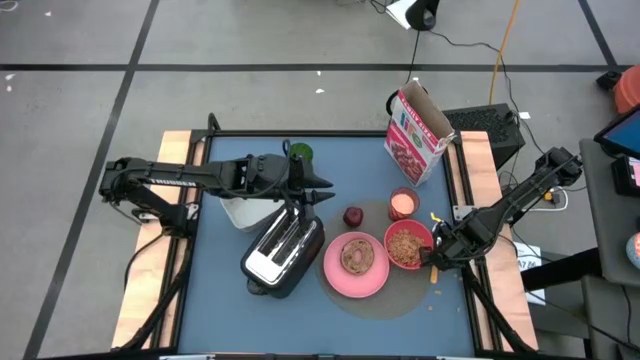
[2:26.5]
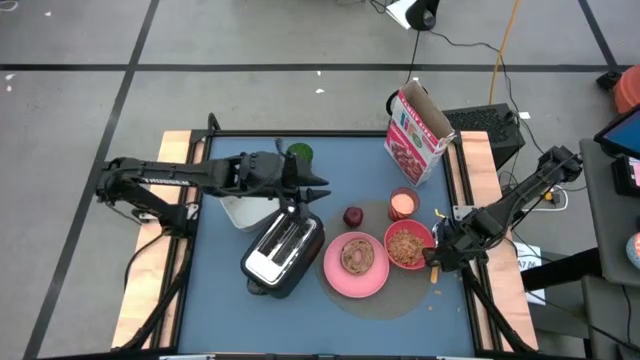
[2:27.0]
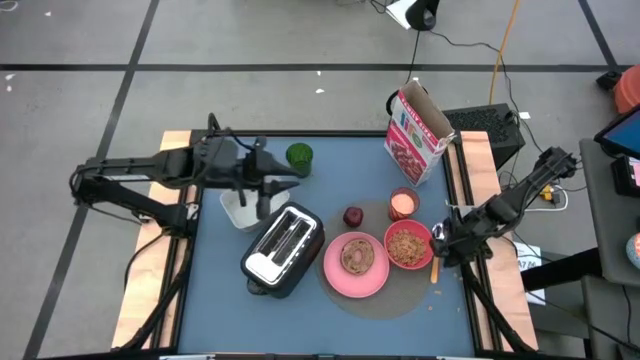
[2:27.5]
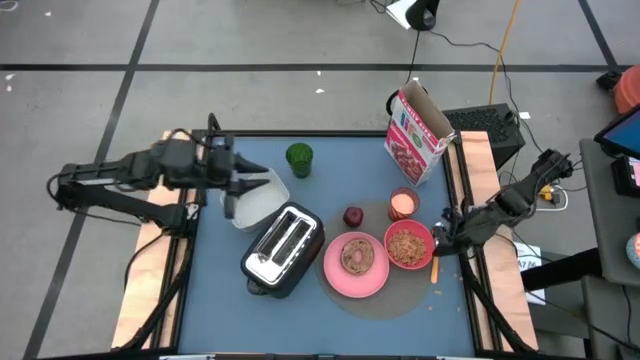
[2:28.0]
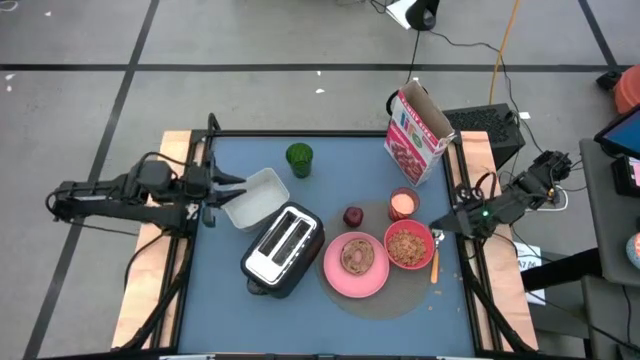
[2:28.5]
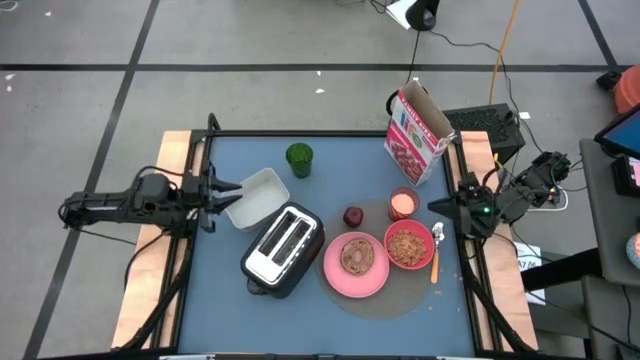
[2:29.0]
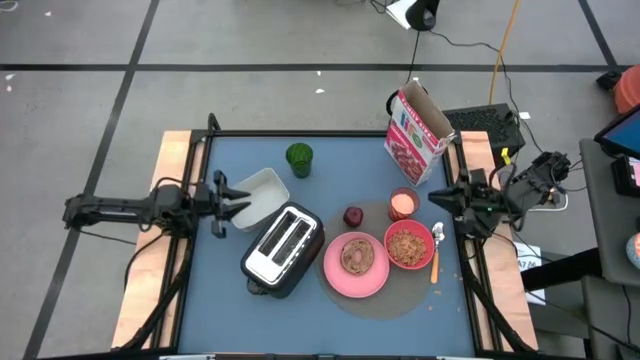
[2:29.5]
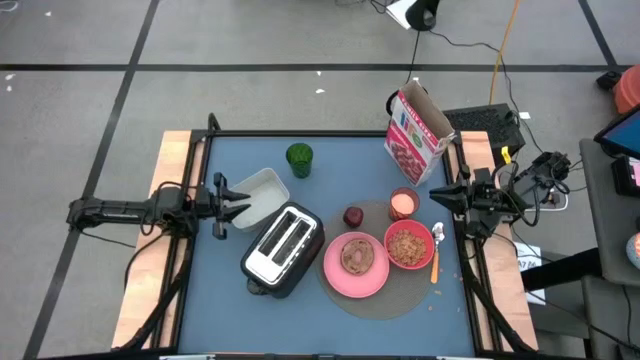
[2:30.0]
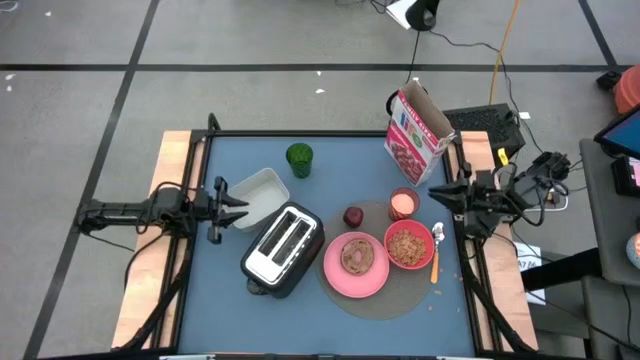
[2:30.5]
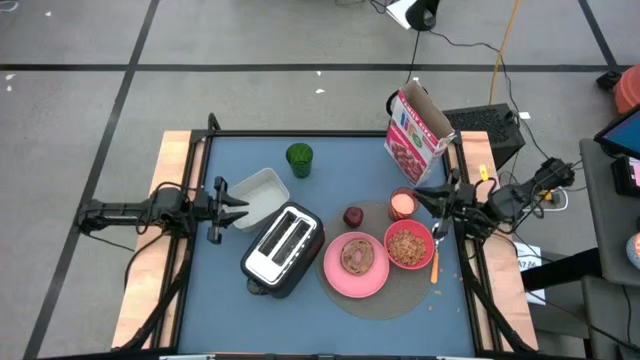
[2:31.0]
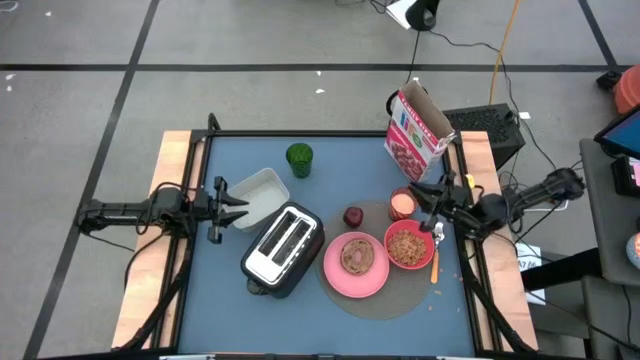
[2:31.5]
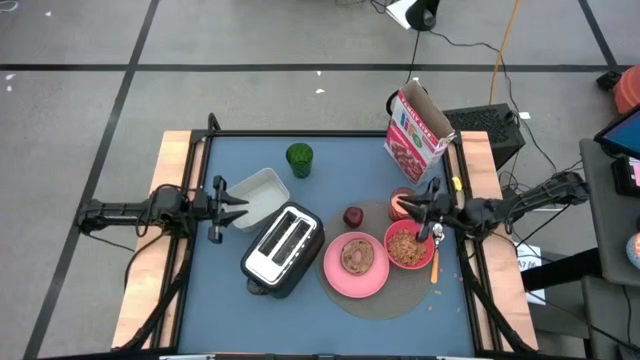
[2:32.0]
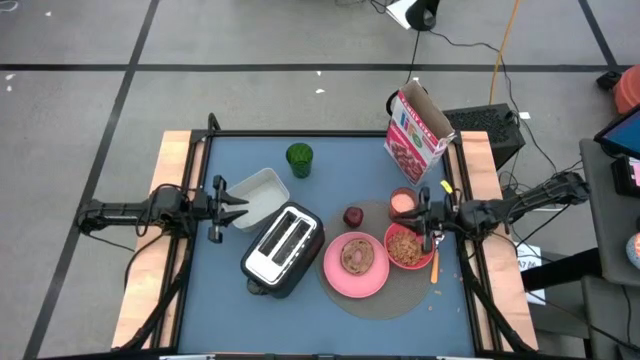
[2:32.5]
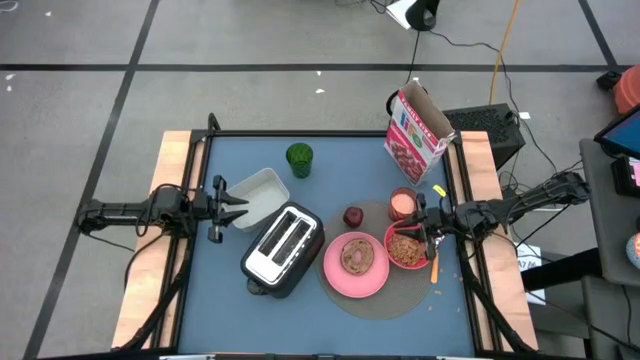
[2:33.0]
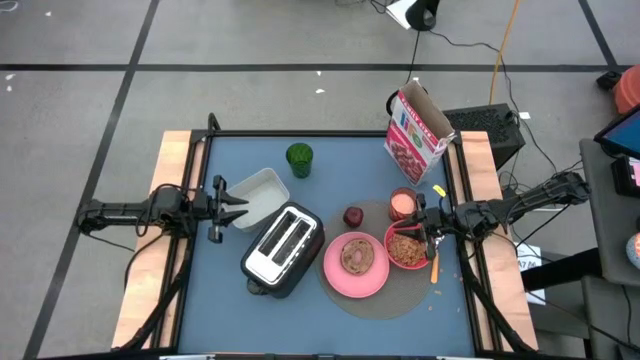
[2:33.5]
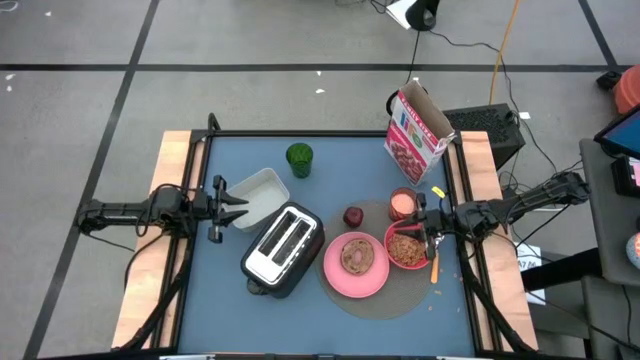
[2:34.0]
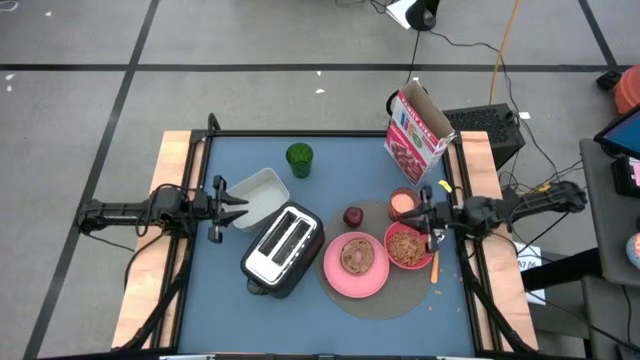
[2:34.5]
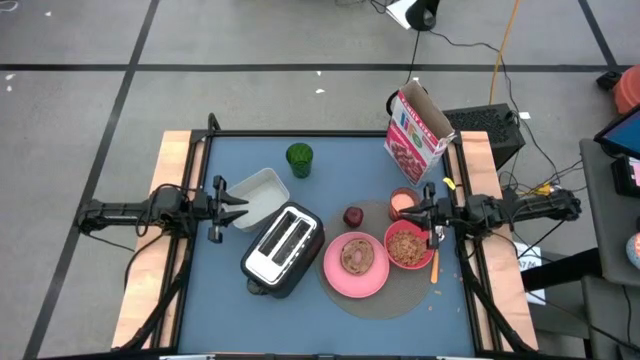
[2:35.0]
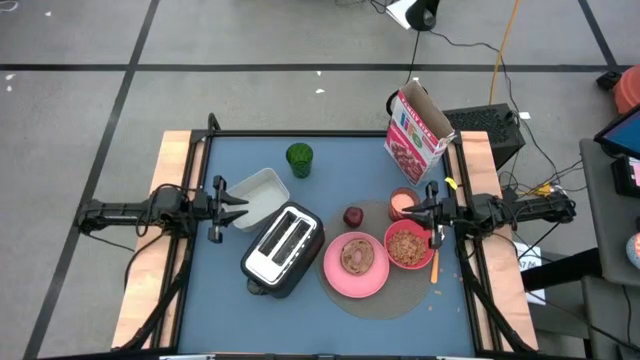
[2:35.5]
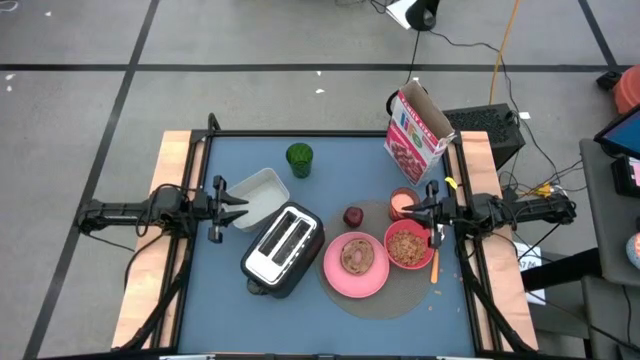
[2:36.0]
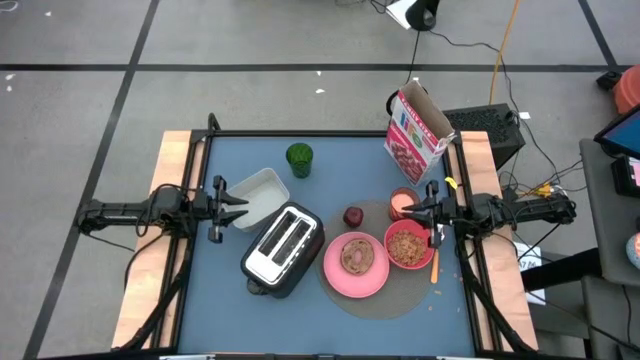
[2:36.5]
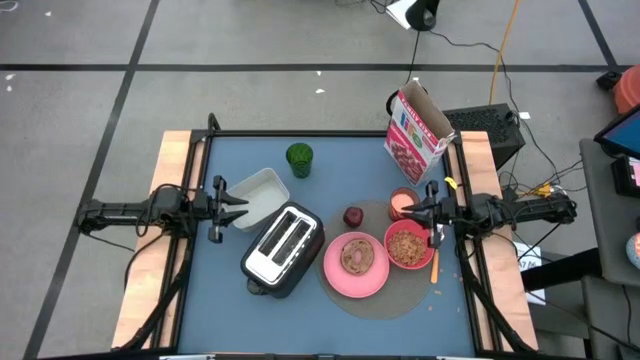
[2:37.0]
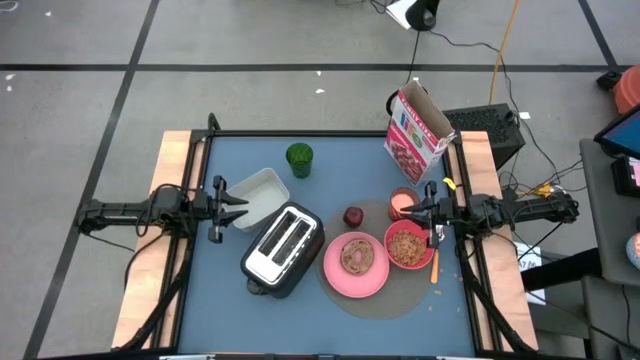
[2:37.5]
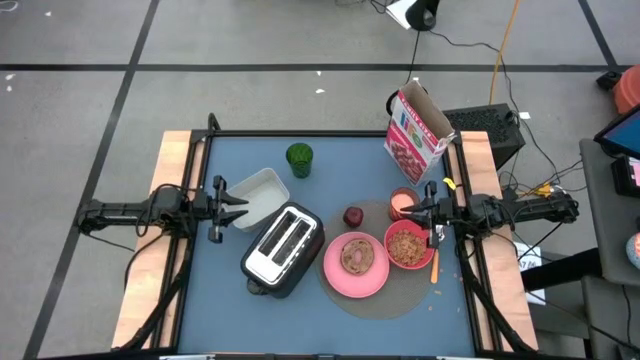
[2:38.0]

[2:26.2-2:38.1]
Task: Arrange a breakfast setting
Return to Home Position

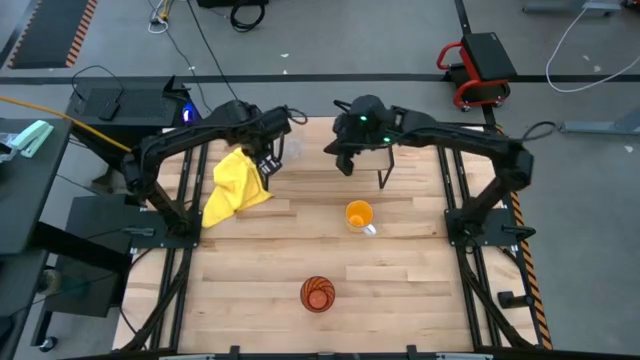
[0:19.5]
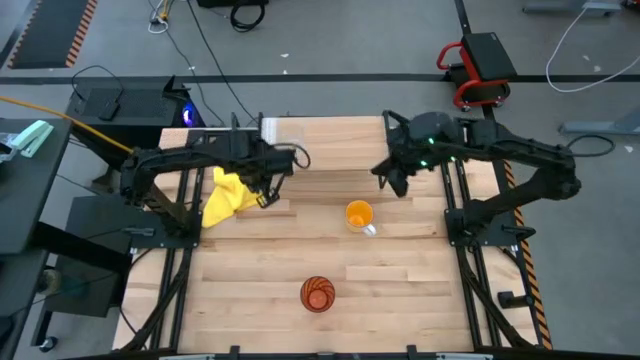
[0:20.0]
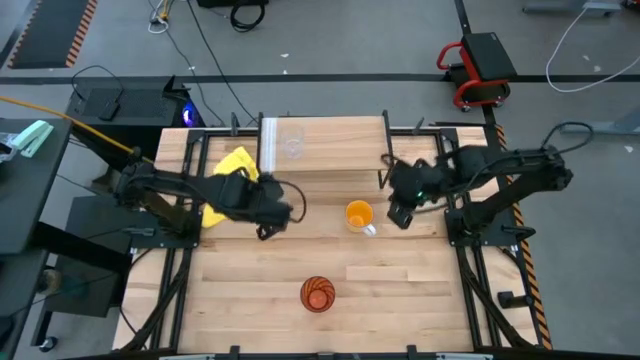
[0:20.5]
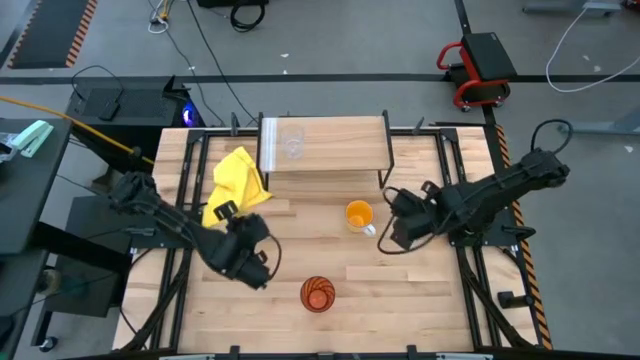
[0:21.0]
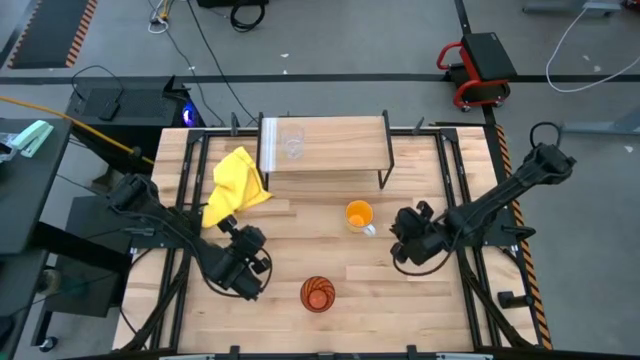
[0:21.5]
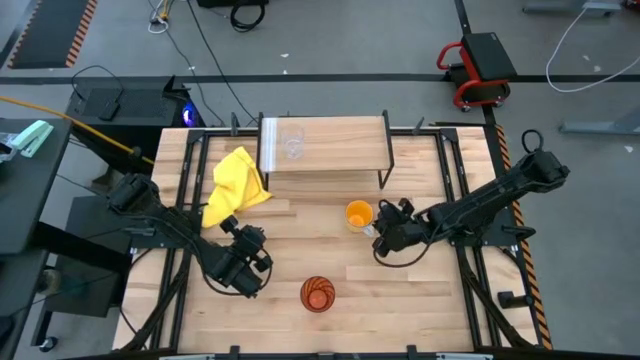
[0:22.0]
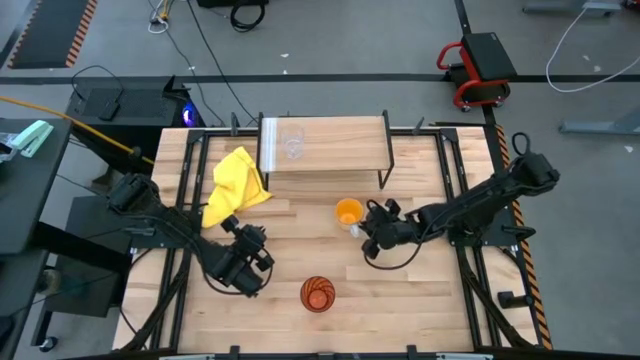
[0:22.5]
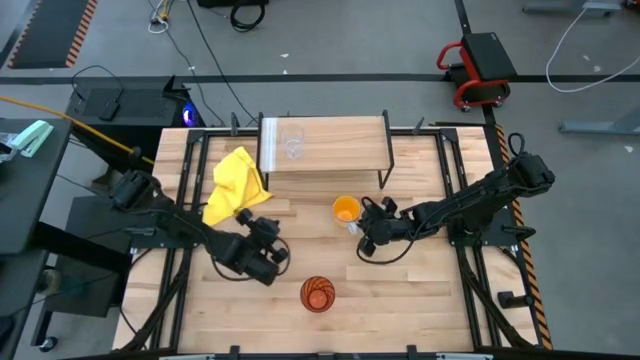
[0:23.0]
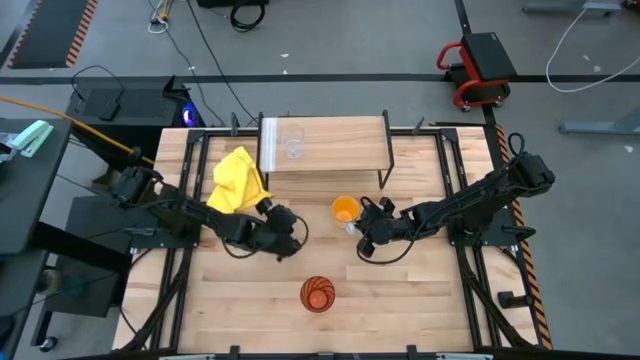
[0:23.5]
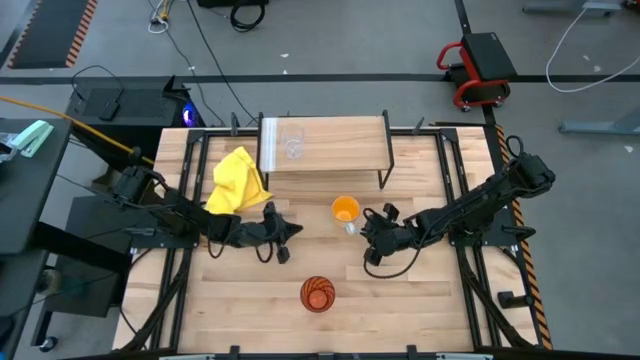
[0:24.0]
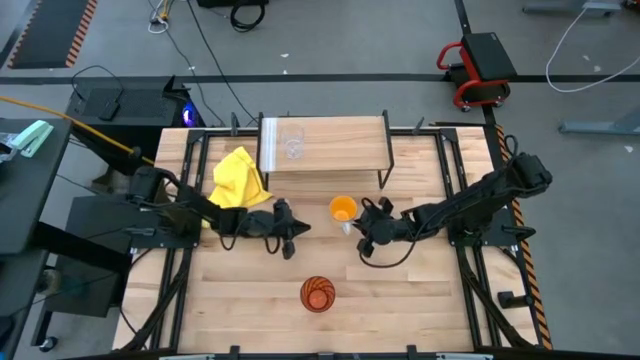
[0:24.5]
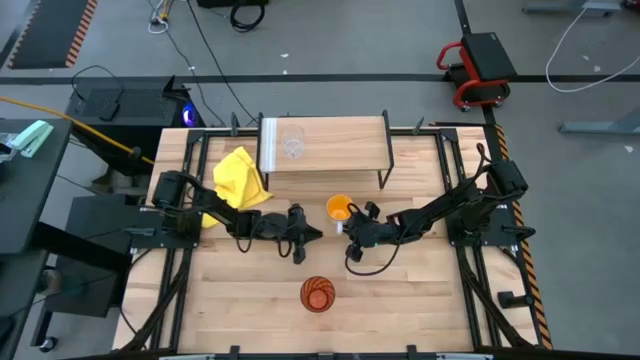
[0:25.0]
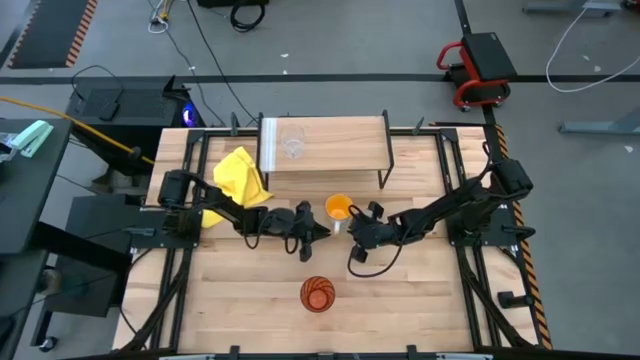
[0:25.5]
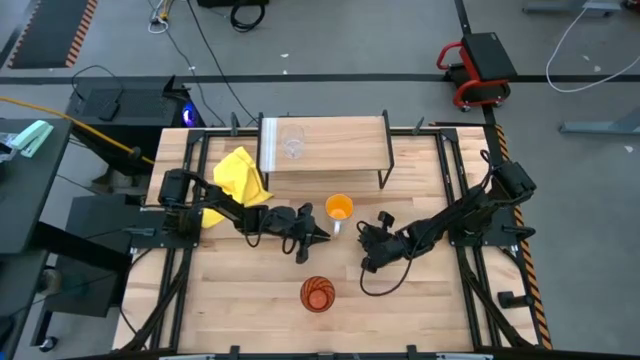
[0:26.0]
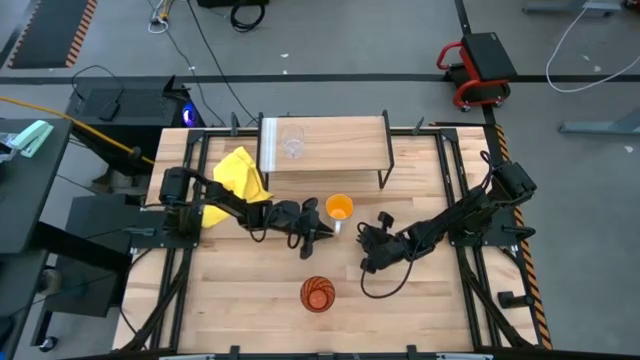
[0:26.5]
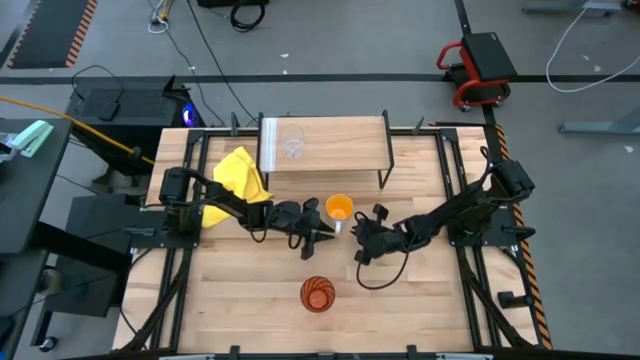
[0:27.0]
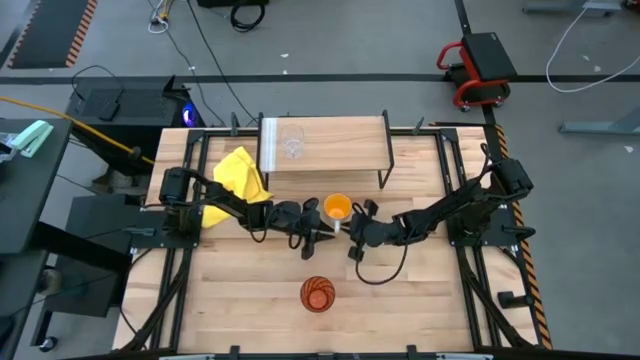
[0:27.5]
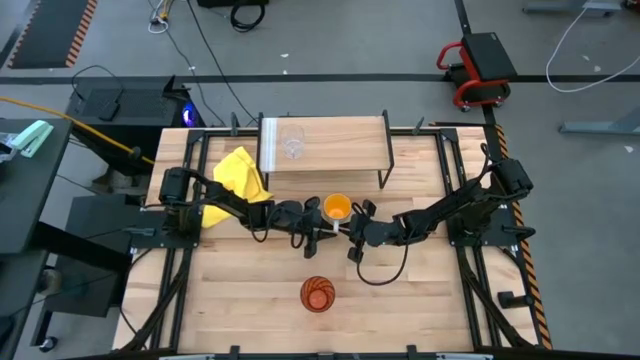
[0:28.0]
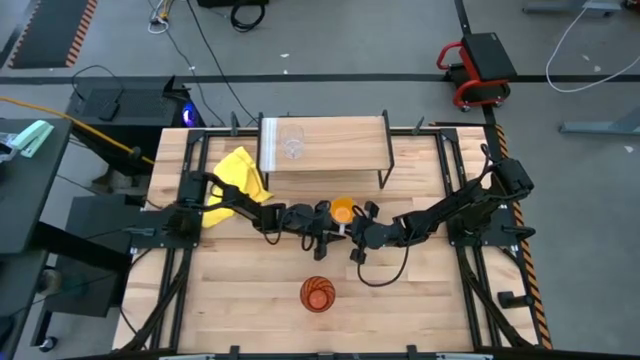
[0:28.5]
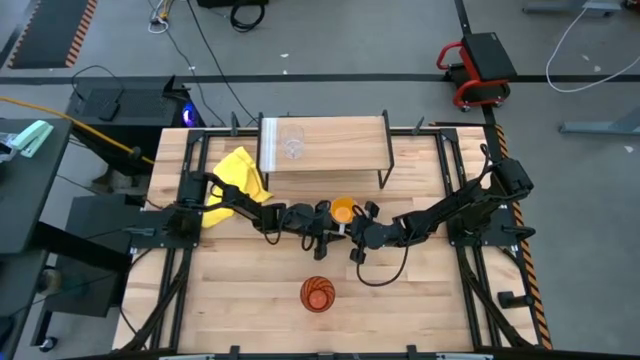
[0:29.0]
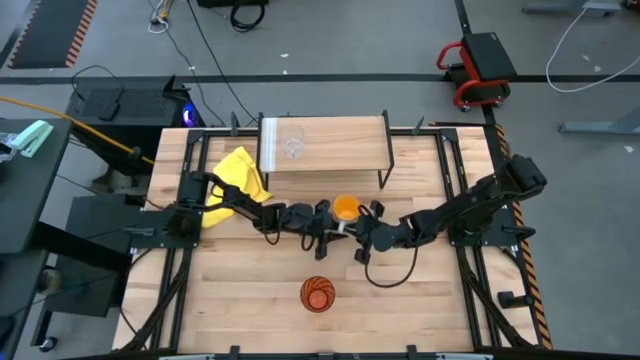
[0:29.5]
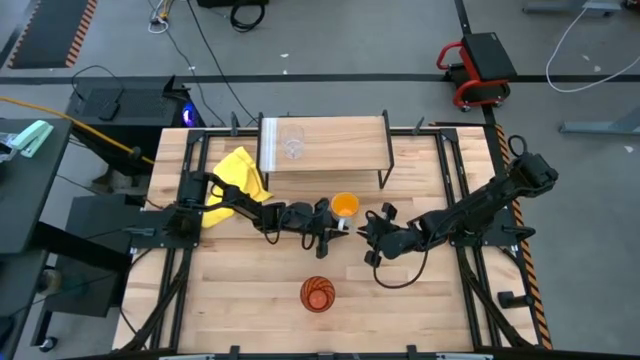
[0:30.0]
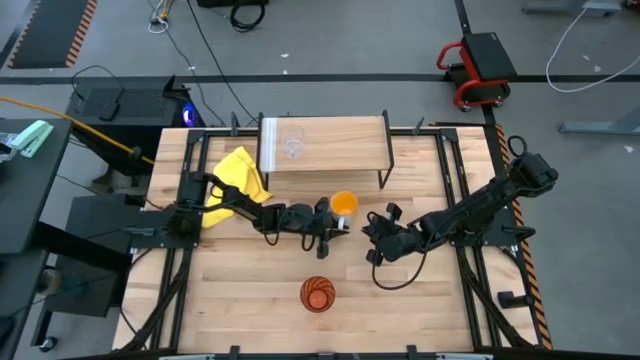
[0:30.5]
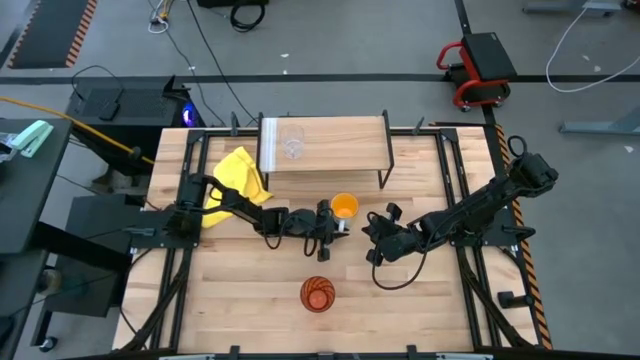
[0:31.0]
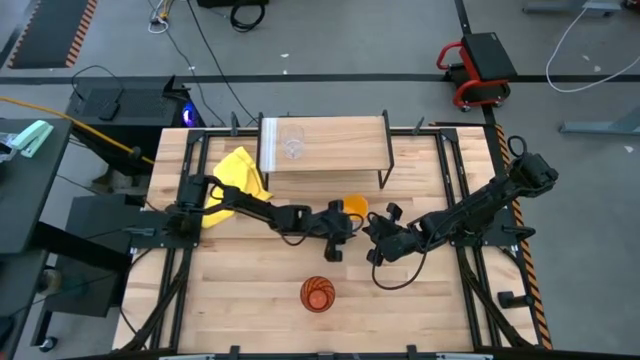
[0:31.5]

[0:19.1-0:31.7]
Task: Stack small to large cups/mugs on shelf
Put the yellow mug on the shelf
